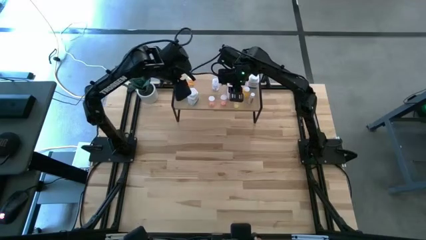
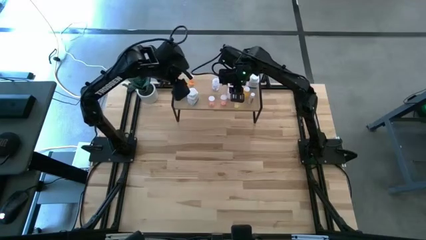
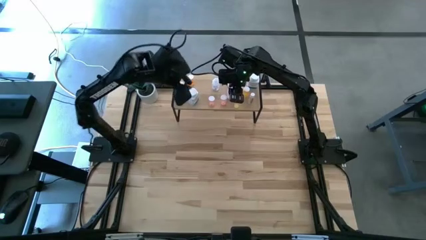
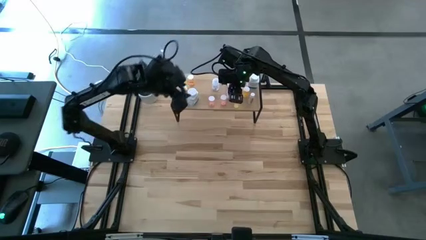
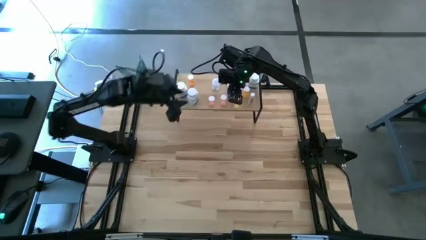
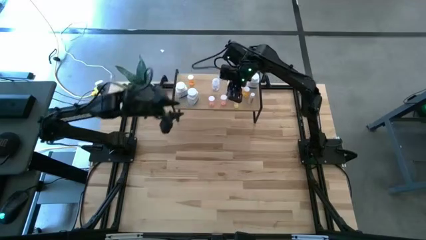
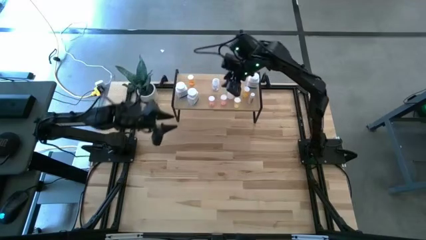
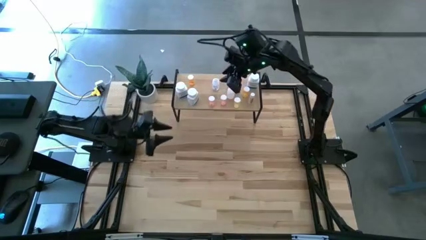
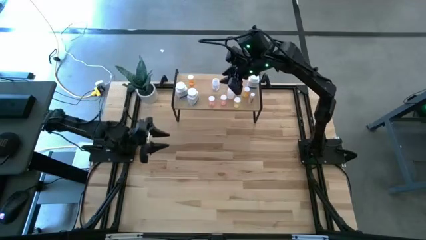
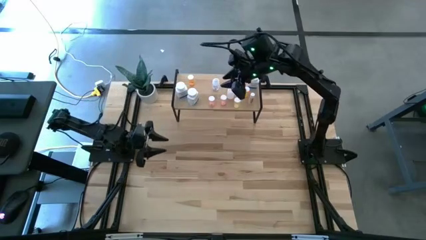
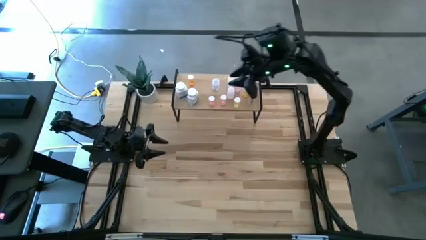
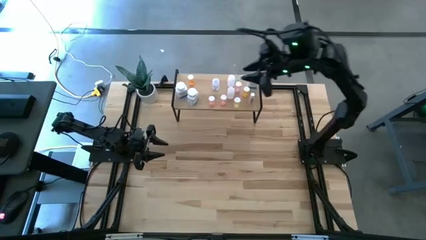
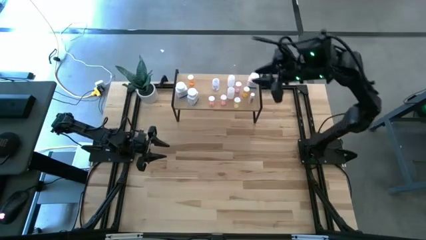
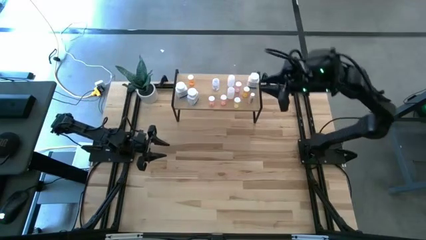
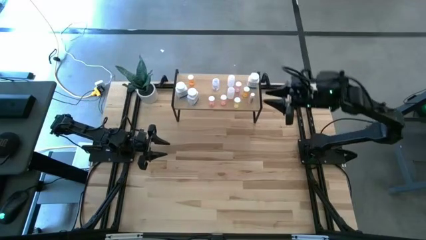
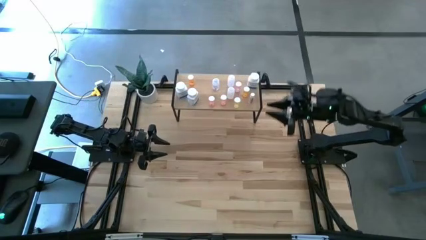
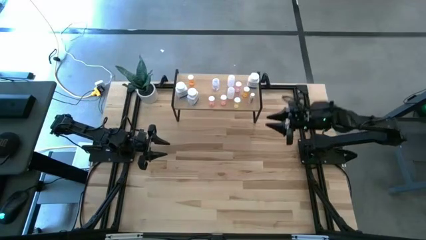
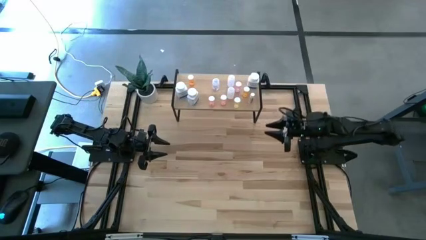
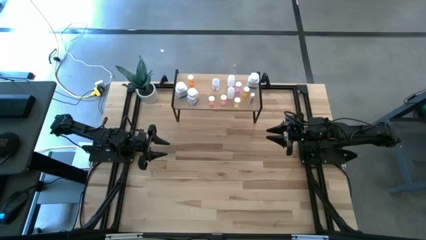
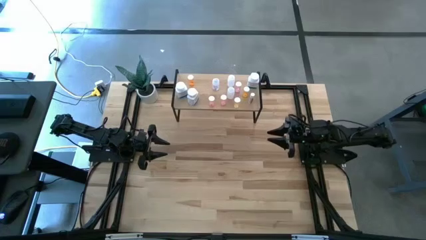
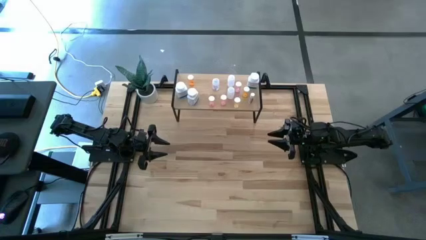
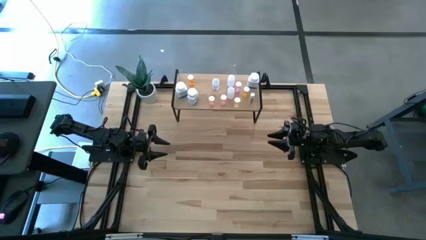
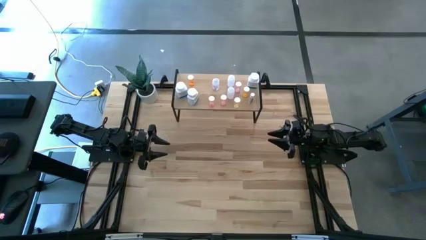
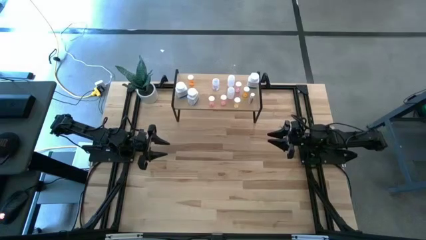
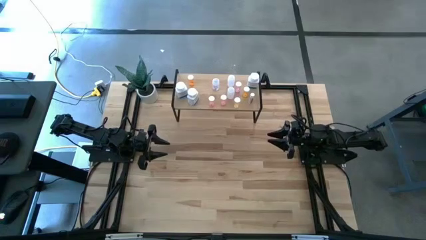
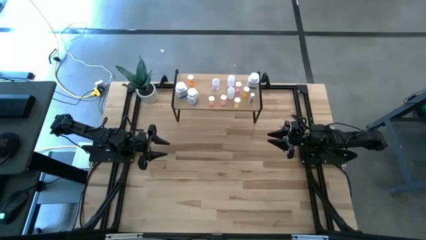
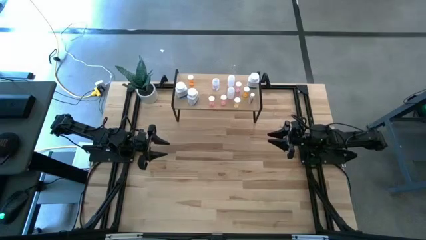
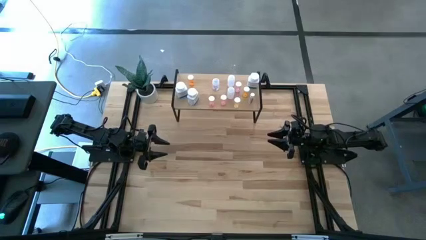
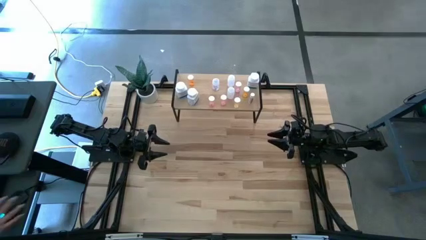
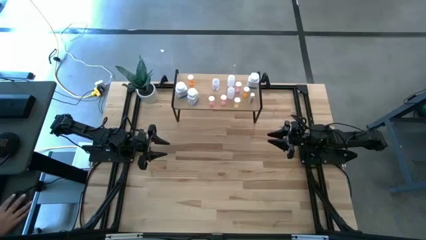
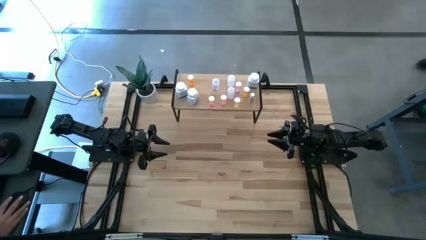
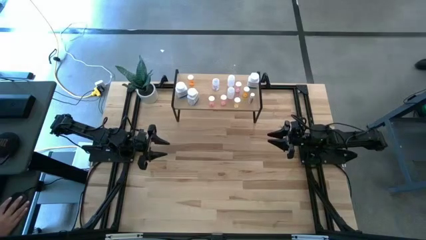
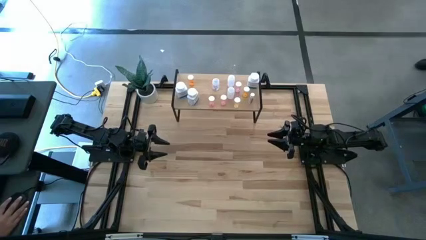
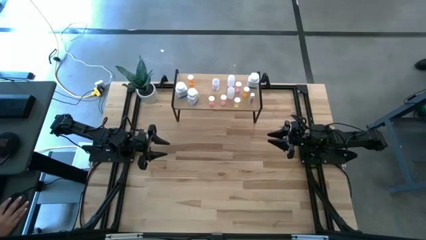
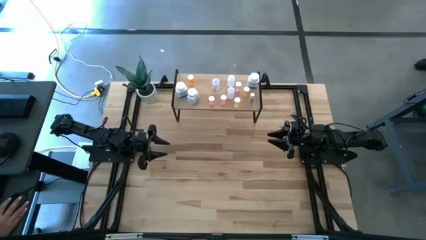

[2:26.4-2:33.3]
Task: Pick and place medicine bottles onto shelf by color
Return to Home Position

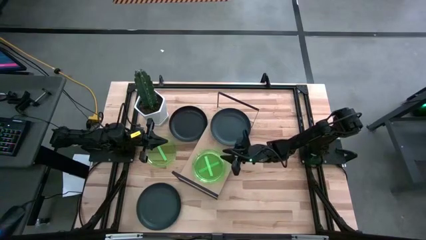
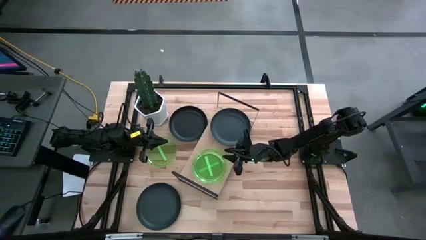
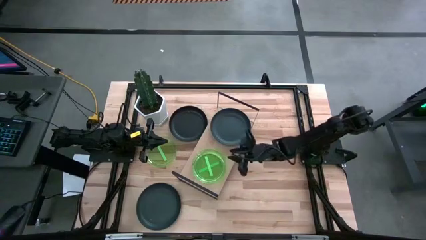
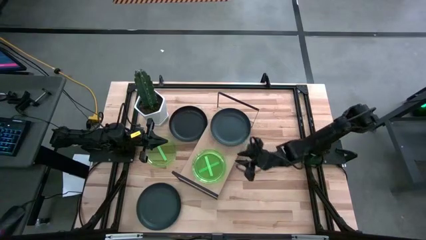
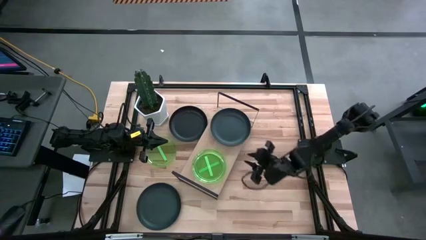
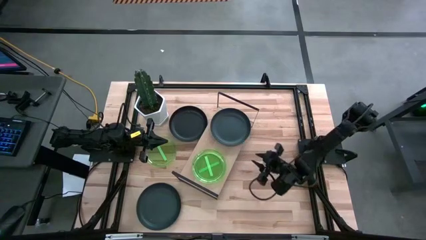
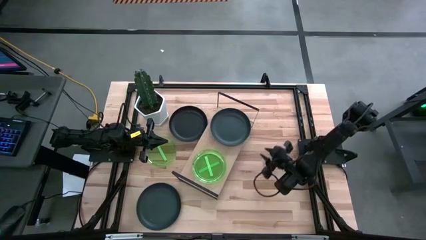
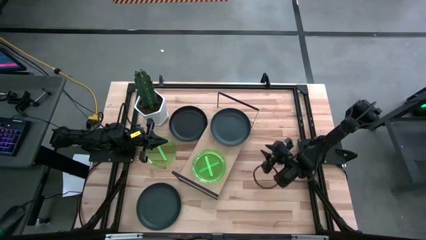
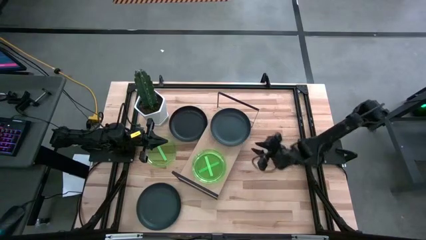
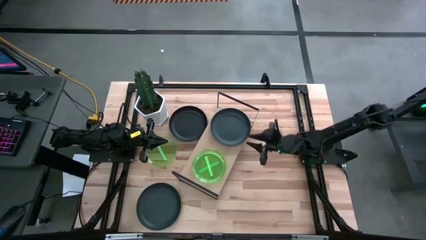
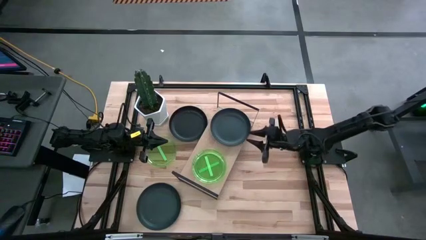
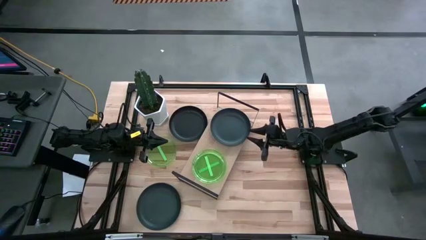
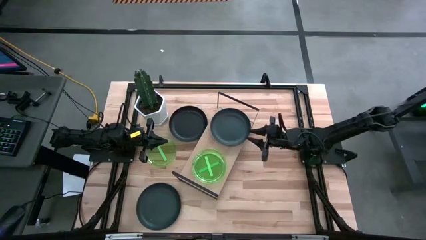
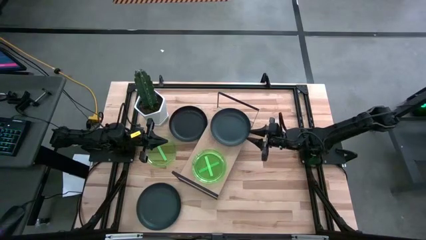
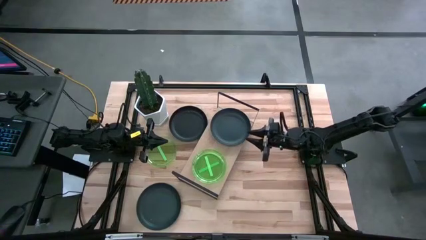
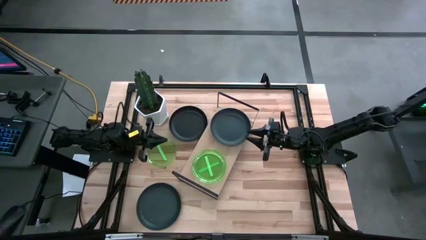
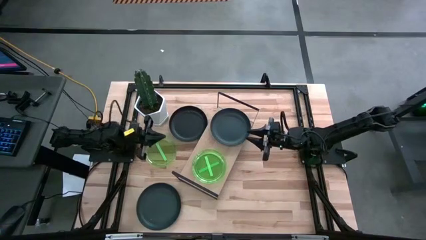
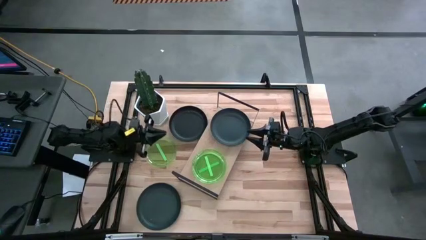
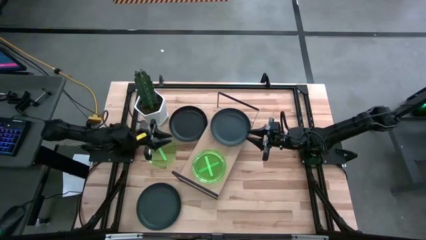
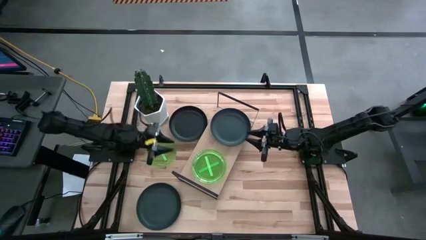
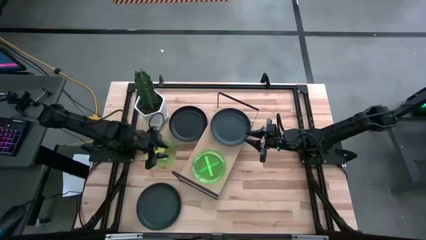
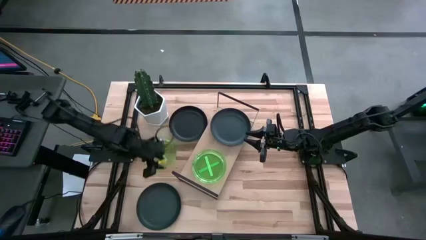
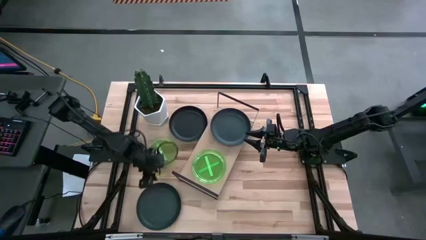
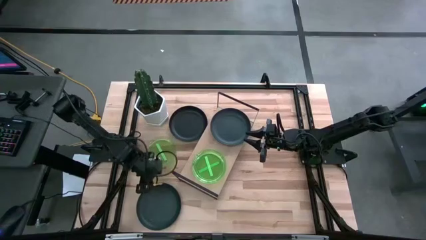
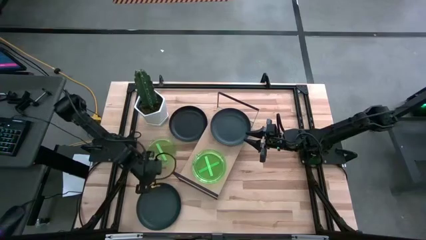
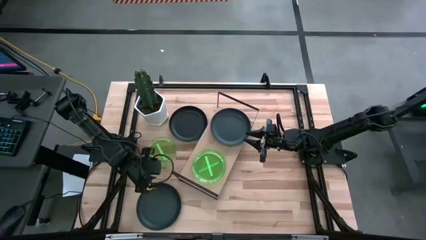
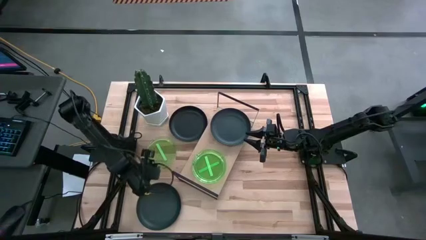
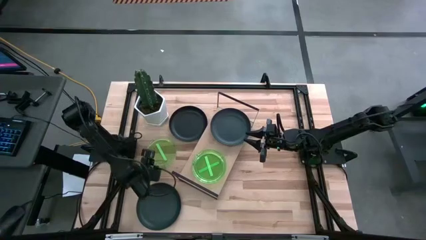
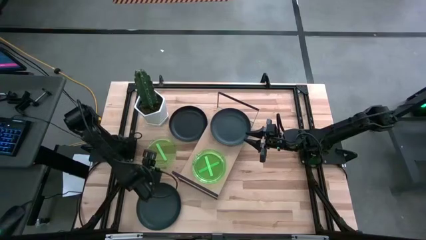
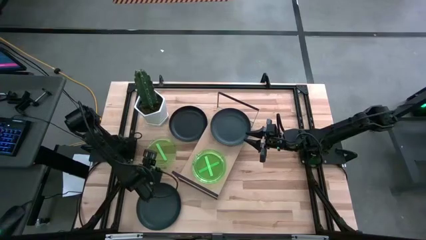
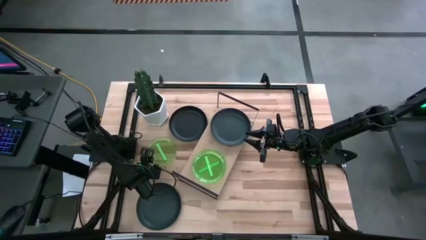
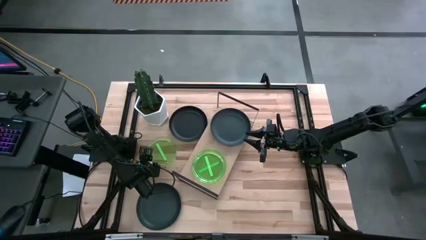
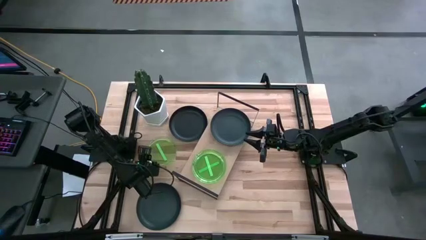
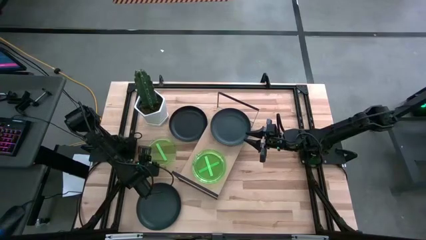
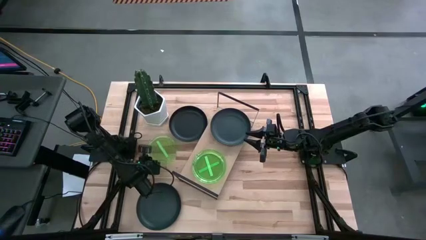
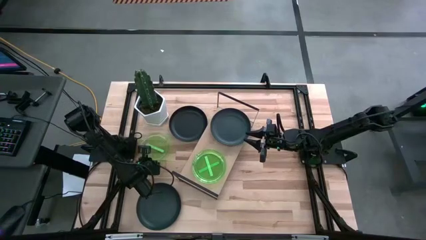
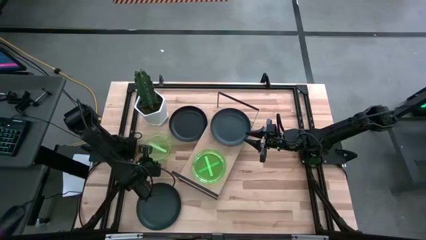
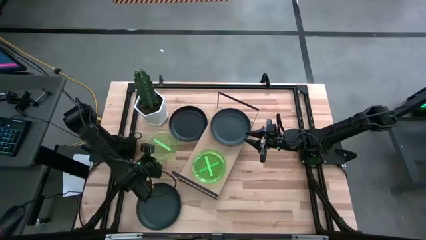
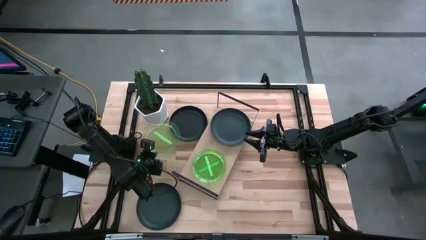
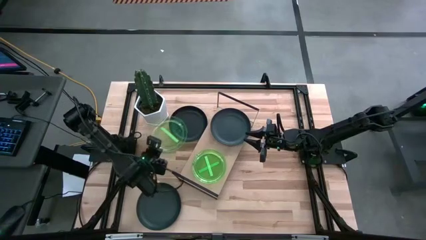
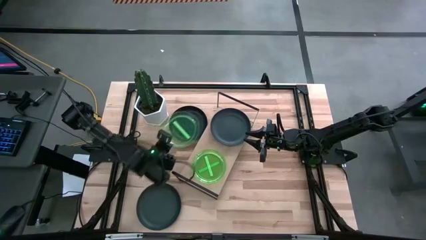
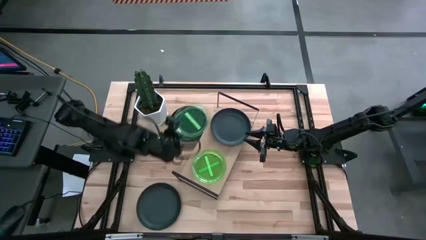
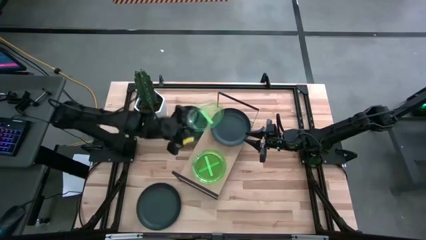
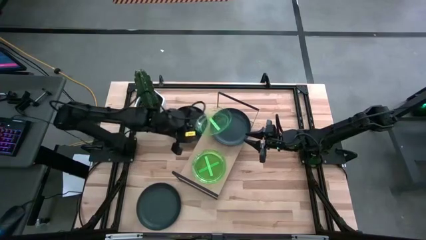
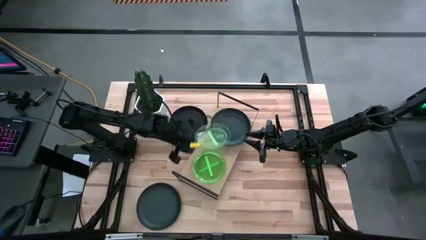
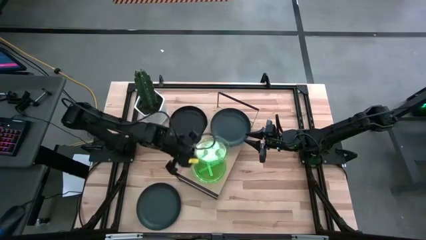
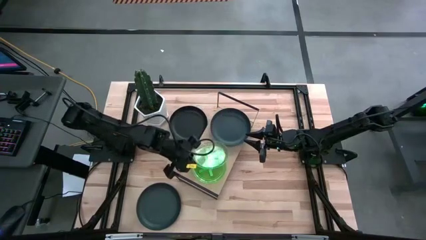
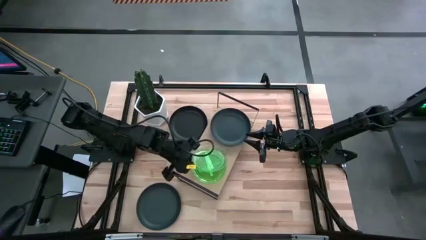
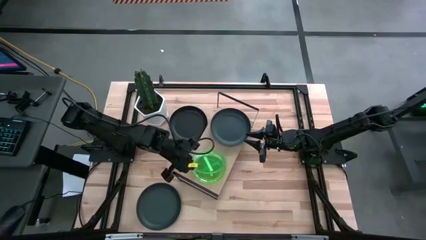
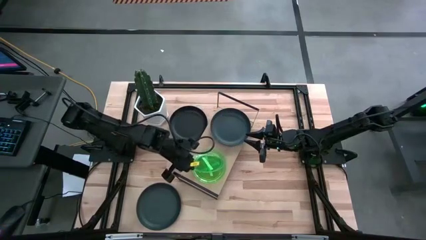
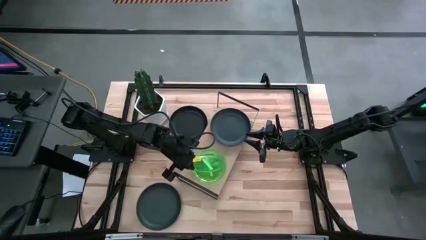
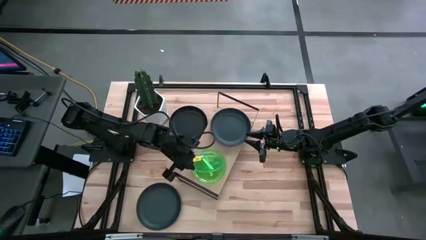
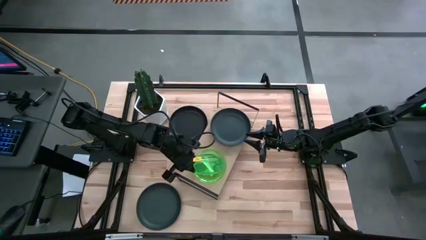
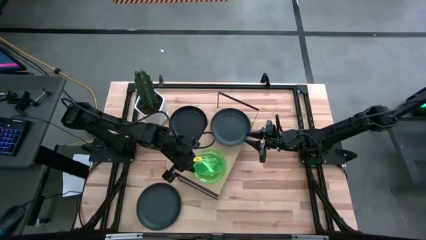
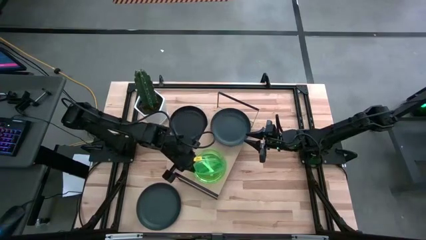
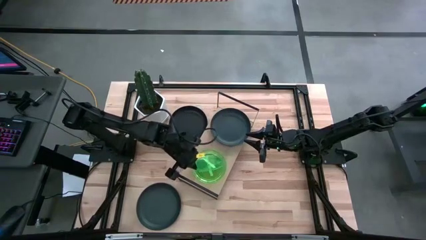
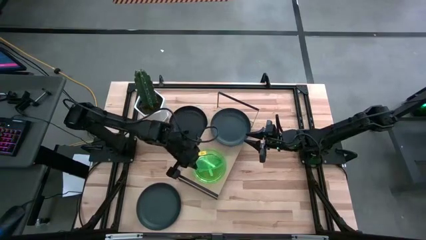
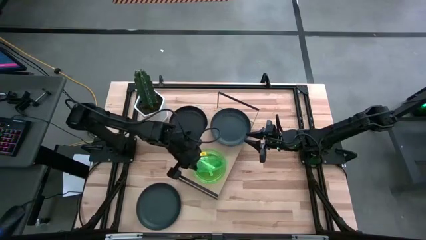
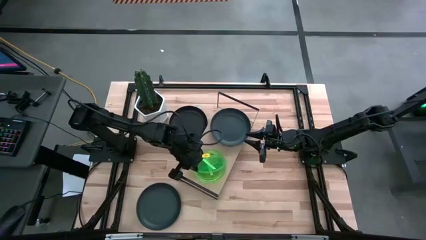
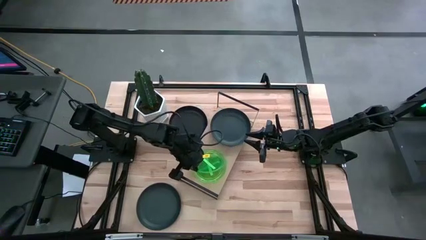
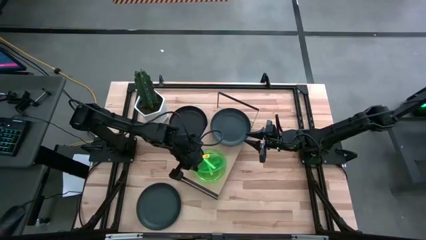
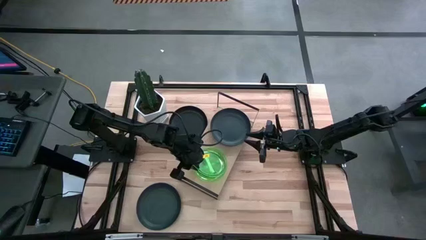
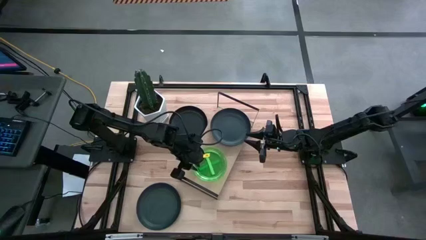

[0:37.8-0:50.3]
Task: Place and stack plates onto a shelf
Stack the green plate on top of the green plate on the shelf
